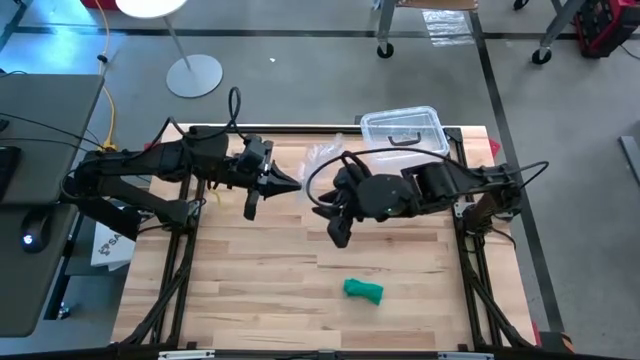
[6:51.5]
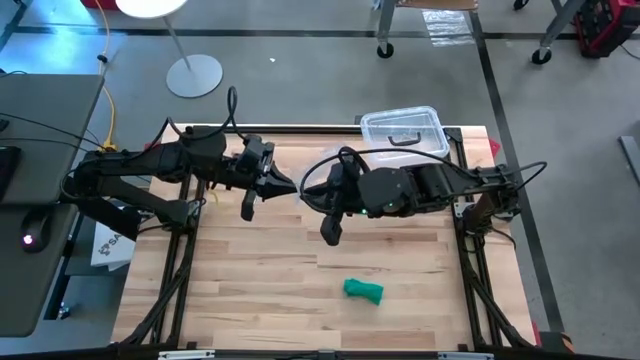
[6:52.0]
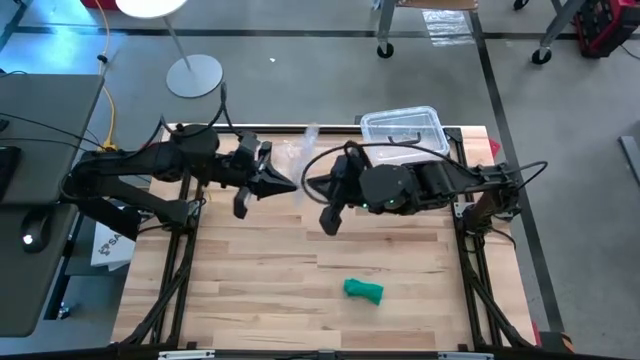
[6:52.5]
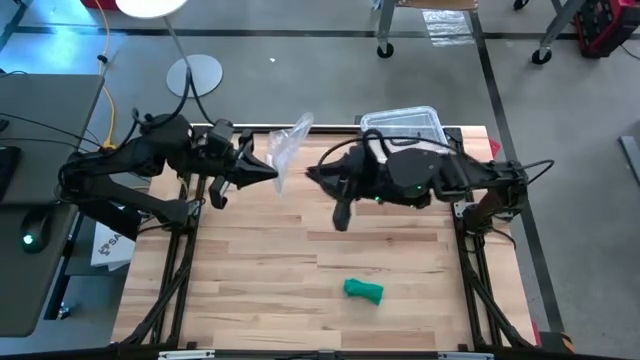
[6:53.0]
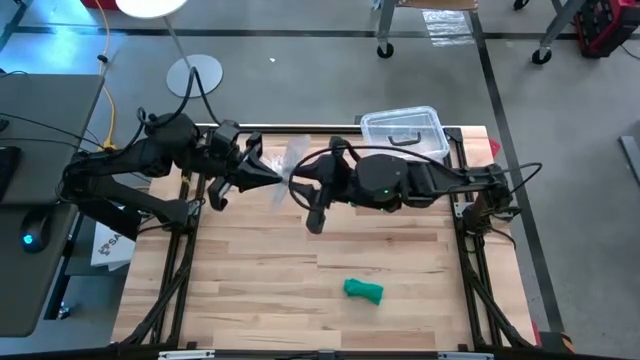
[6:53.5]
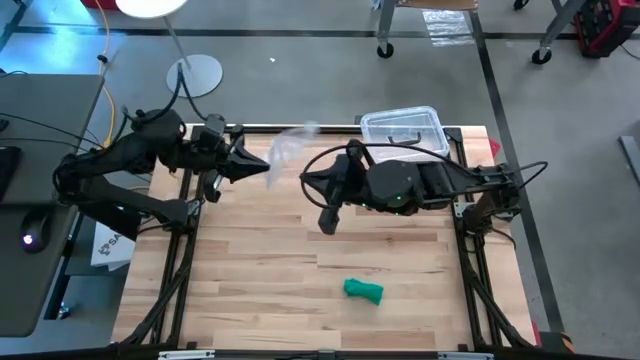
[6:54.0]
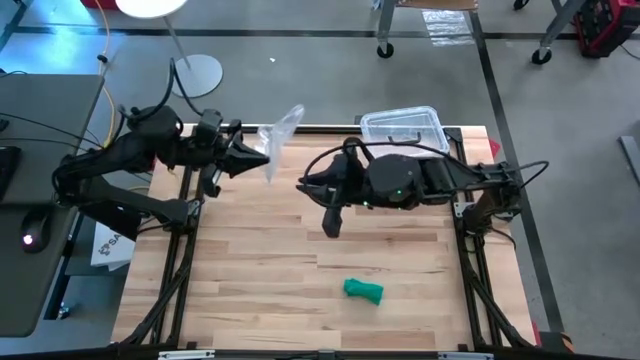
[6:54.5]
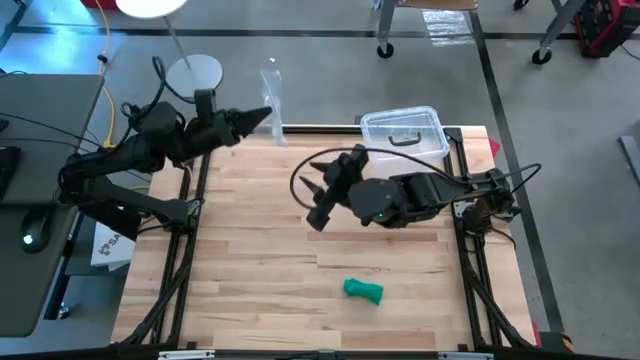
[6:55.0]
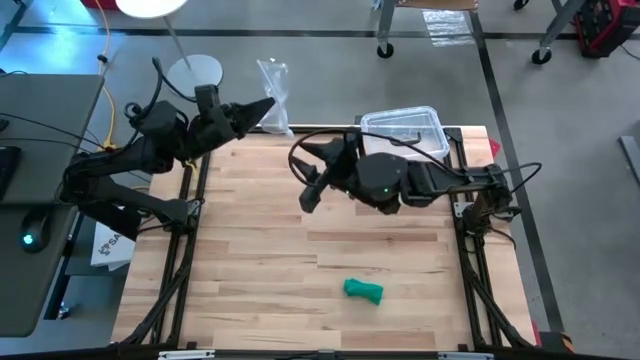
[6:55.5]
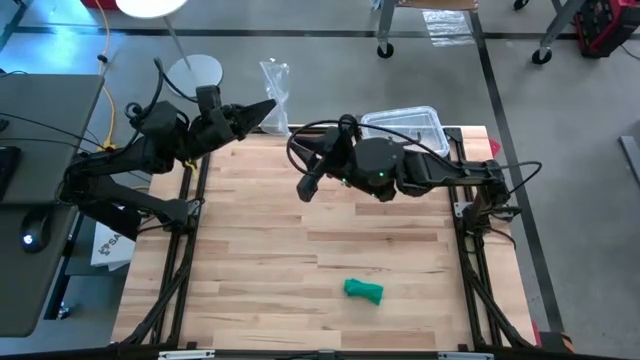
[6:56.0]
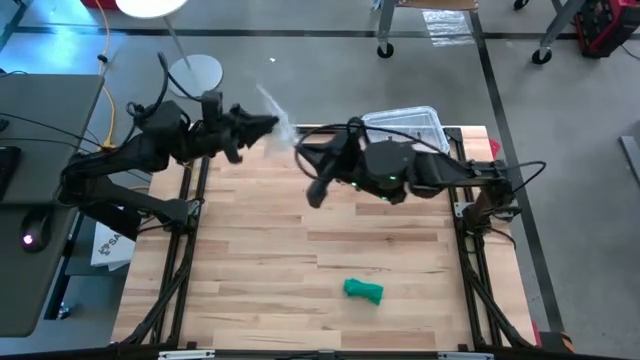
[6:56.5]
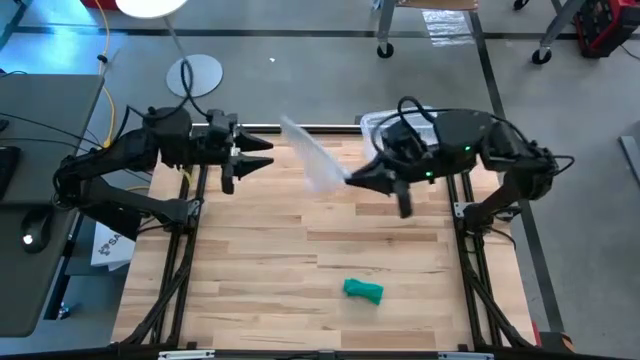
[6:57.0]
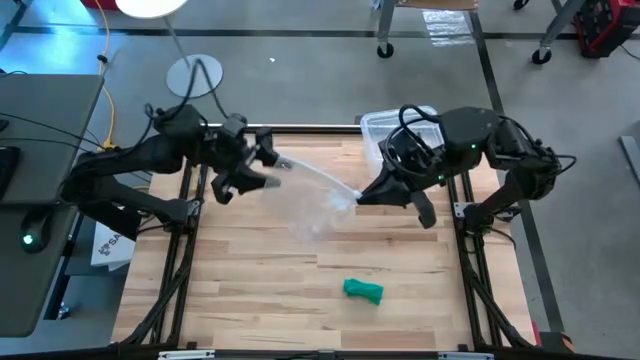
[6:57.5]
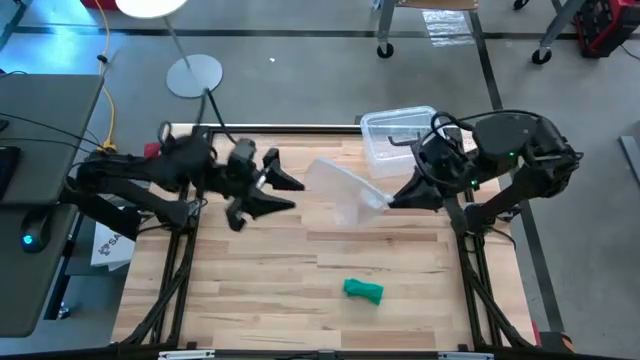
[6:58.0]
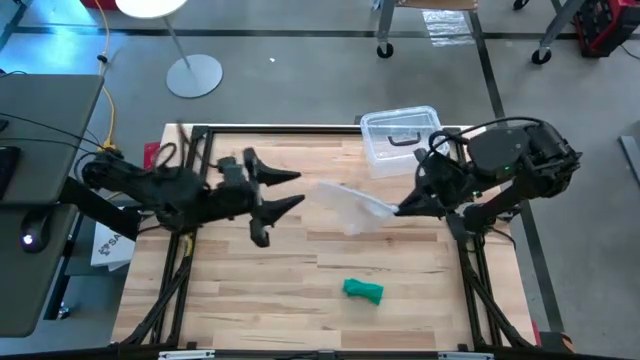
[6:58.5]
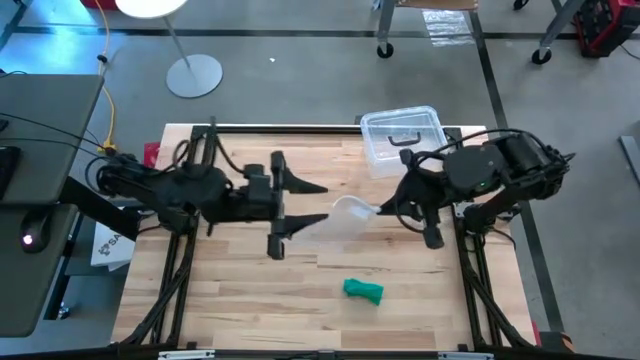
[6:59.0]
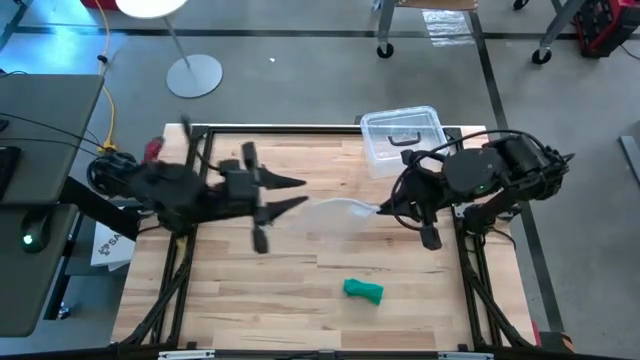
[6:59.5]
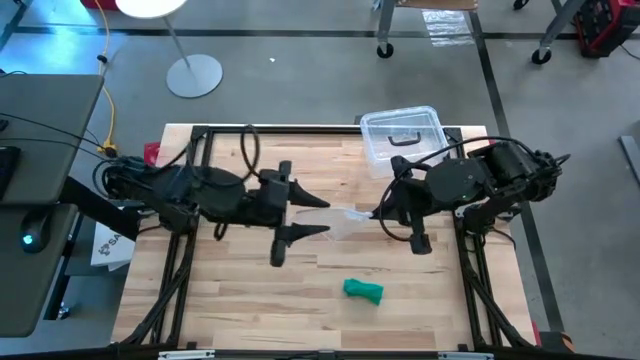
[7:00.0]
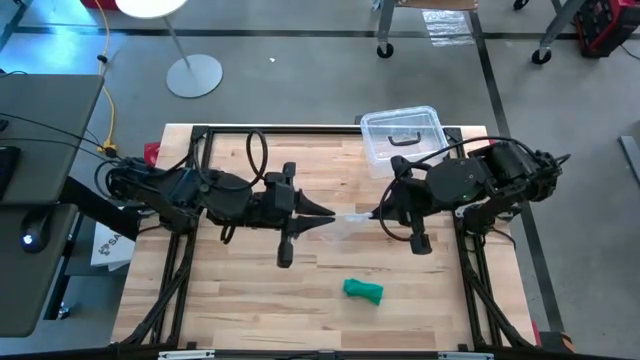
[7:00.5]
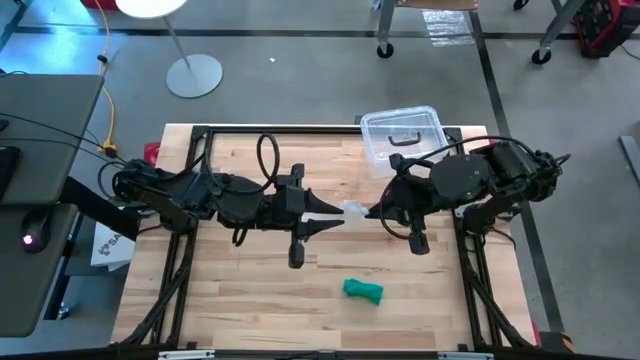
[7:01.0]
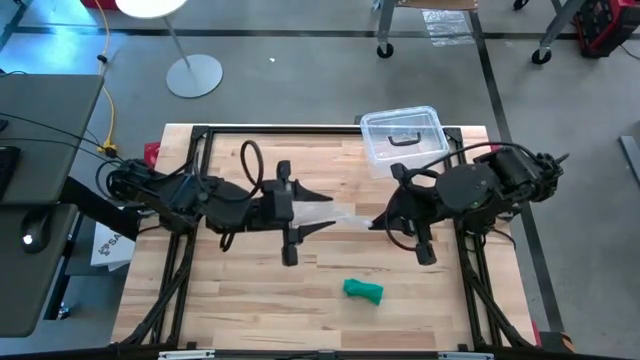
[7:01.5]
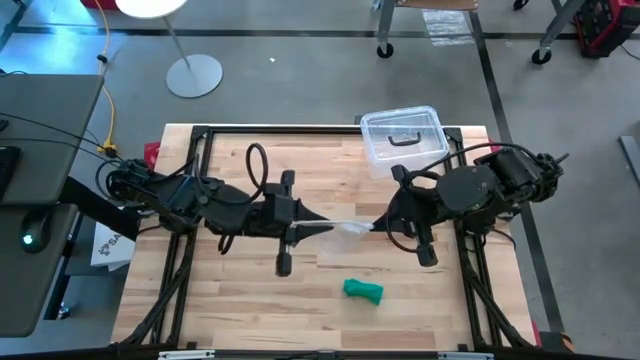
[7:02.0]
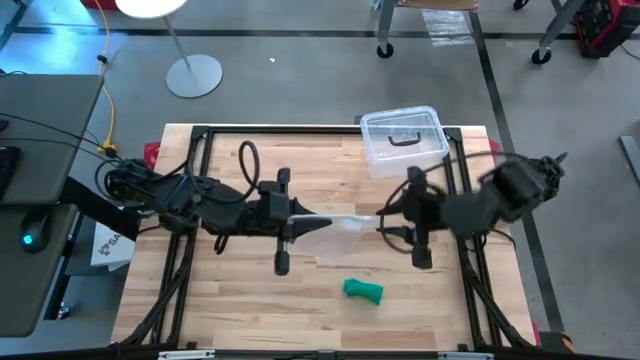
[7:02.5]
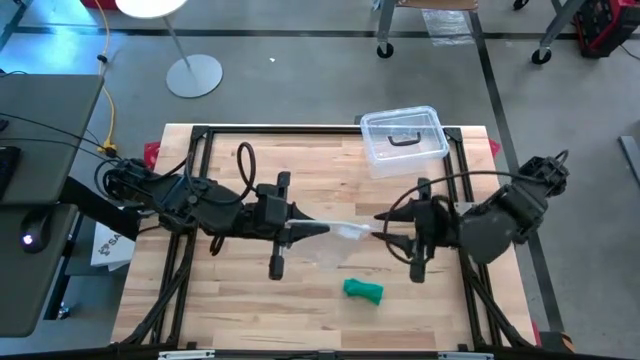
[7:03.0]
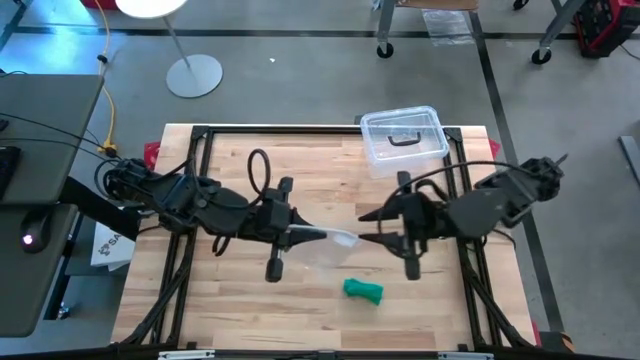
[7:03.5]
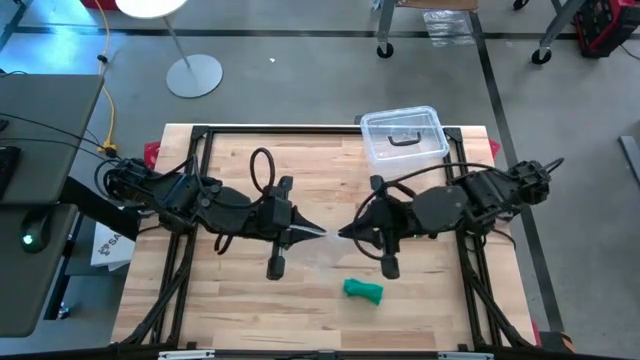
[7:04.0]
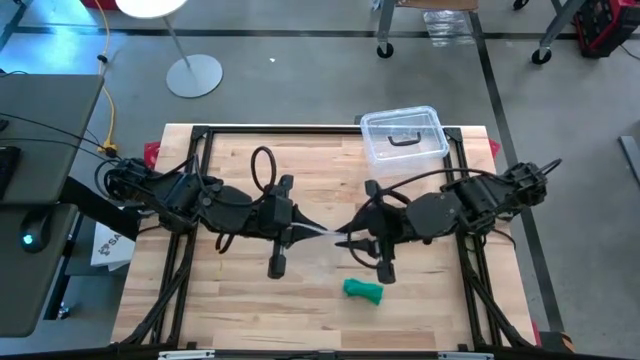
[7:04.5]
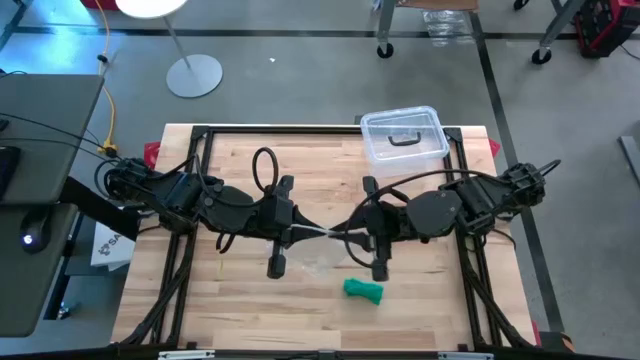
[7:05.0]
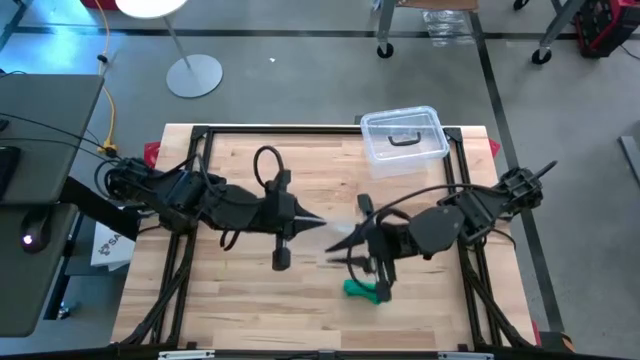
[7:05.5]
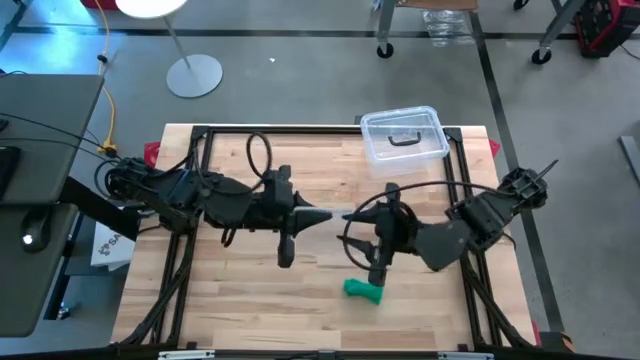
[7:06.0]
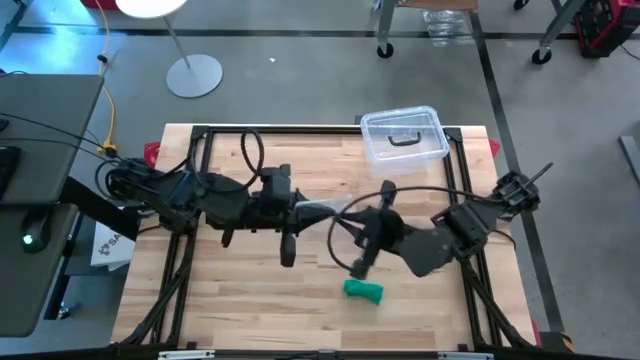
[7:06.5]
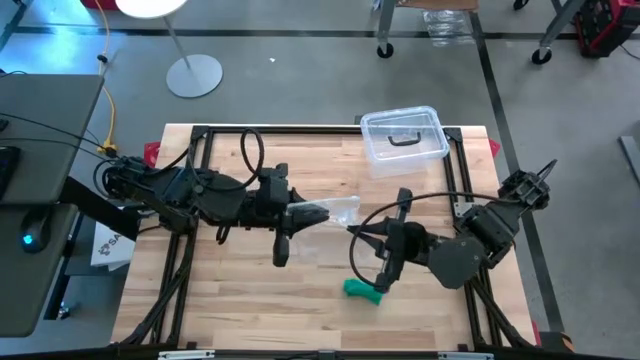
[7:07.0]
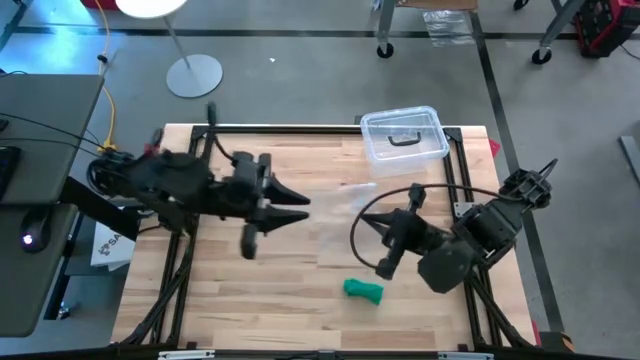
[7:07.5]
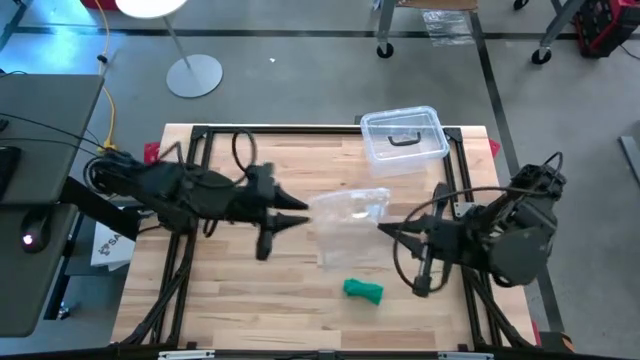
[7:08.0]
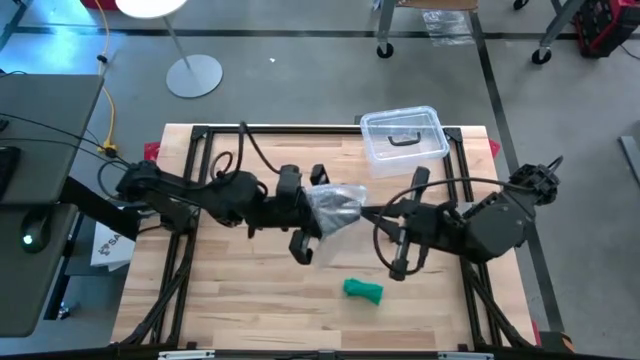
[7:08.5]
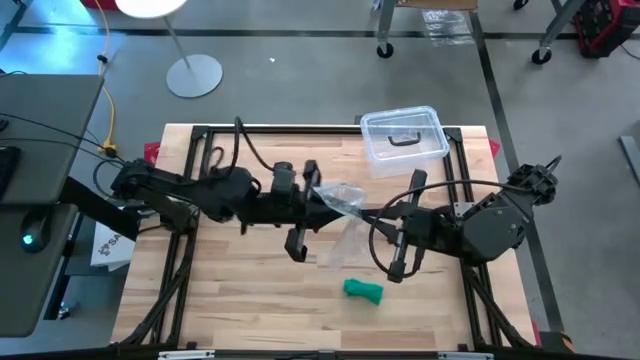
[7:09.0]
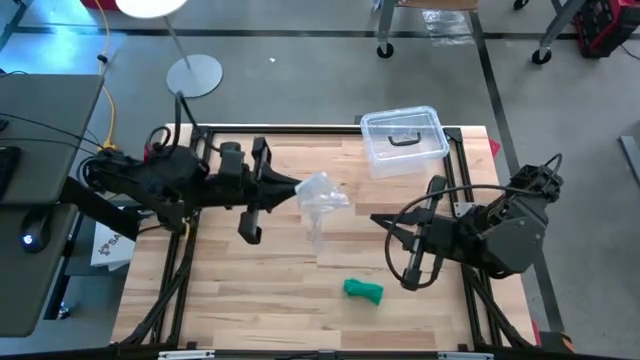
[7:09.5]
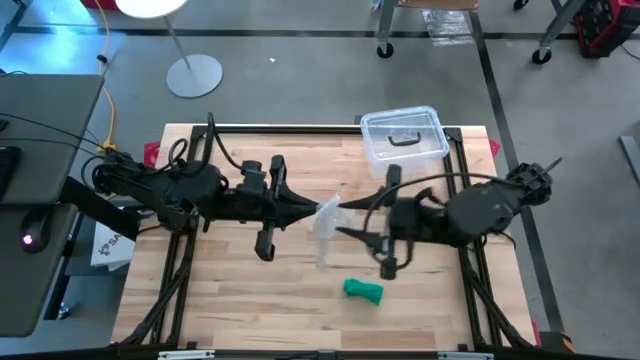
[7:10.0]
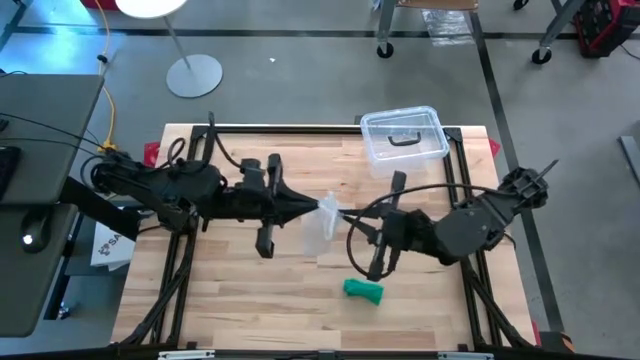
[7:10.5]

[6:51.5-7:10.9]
Task: Roll bandage
Open the transparent zip bag

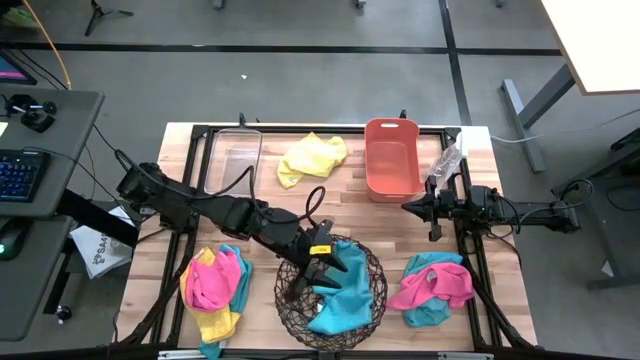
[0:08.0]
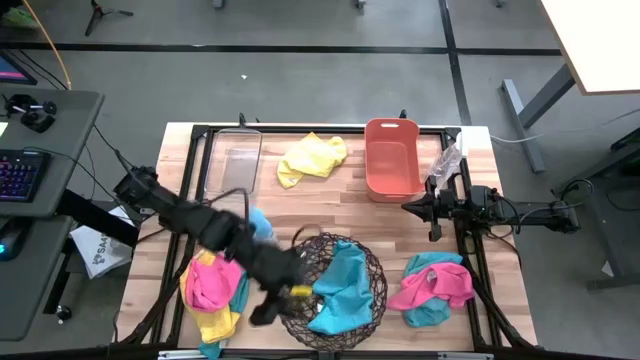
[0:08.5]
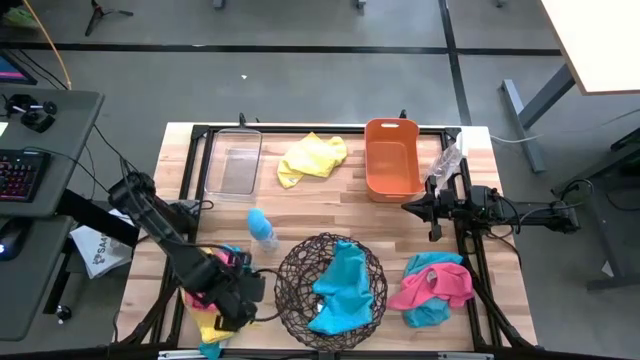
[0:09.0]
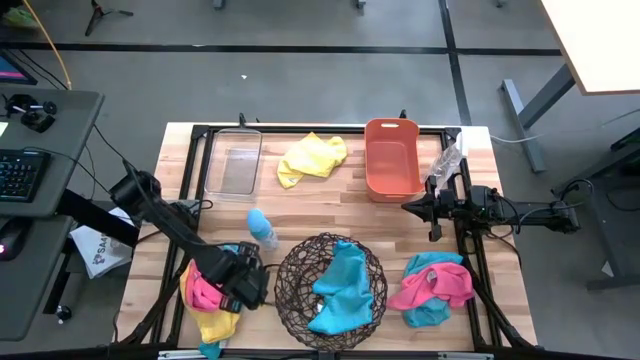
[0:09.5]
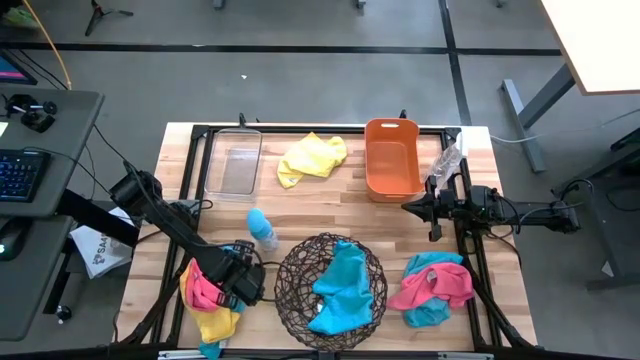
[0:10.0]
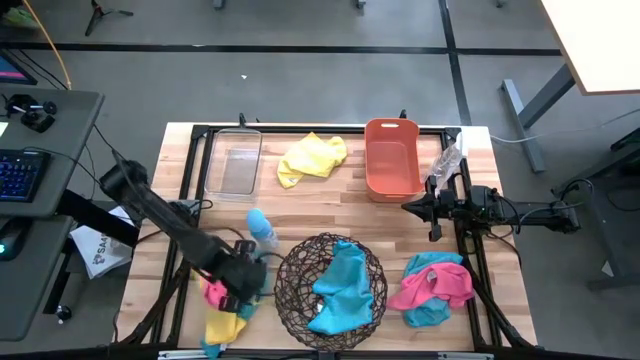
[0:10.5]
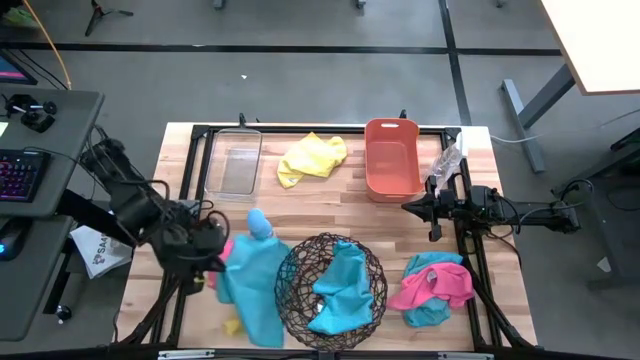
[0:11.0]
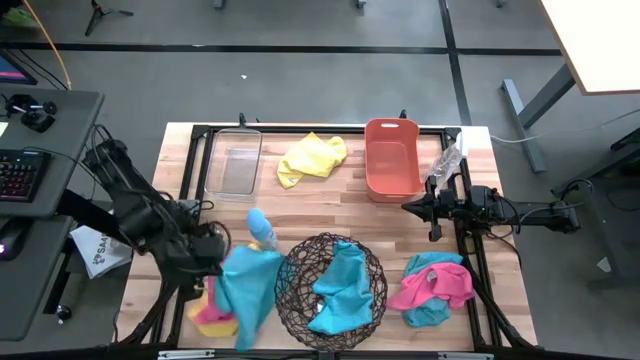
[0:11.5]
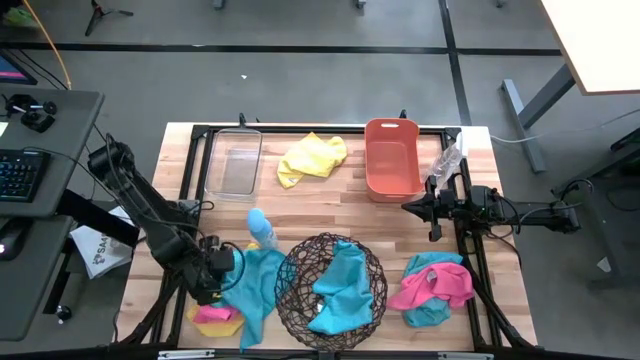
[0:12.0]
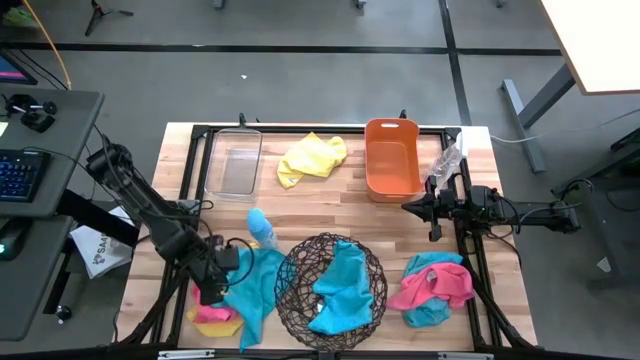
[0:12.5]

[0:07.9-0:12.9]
Task: Sort microfiber towel by color & place in baskets
Put the right blue towel into the wooden basket
